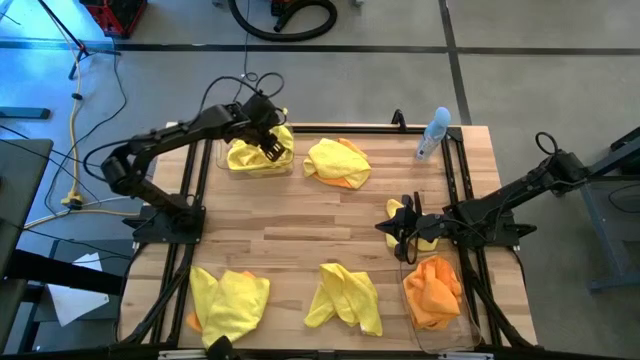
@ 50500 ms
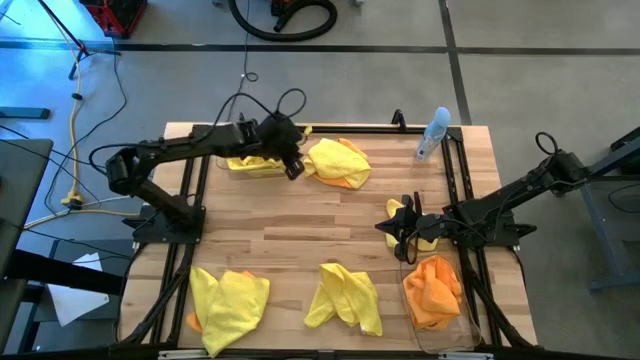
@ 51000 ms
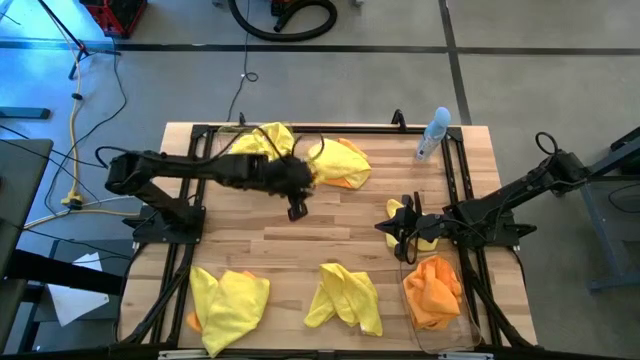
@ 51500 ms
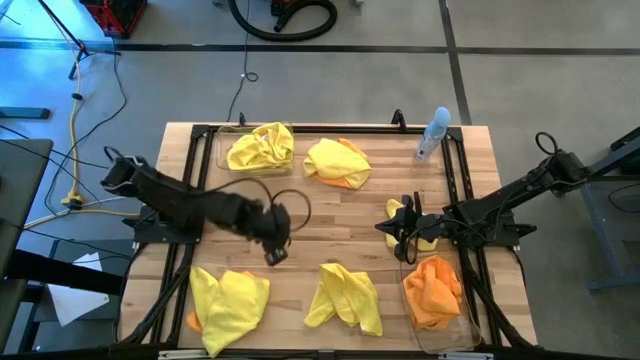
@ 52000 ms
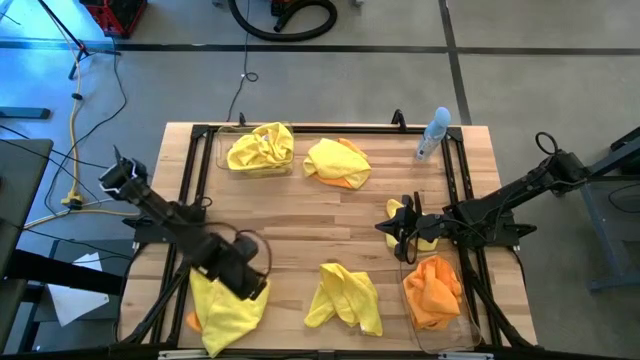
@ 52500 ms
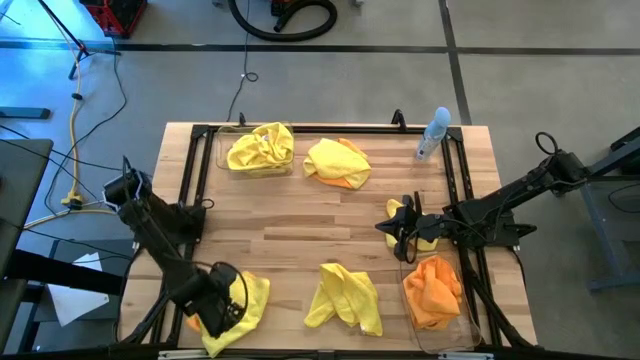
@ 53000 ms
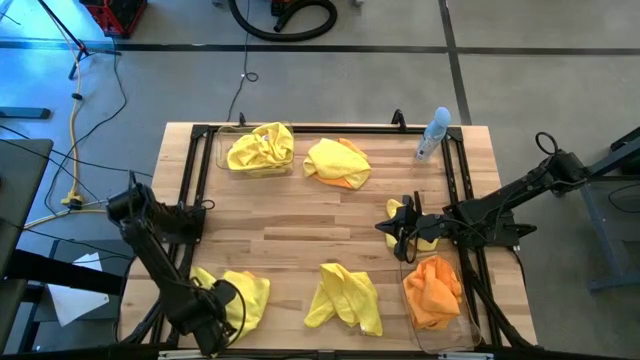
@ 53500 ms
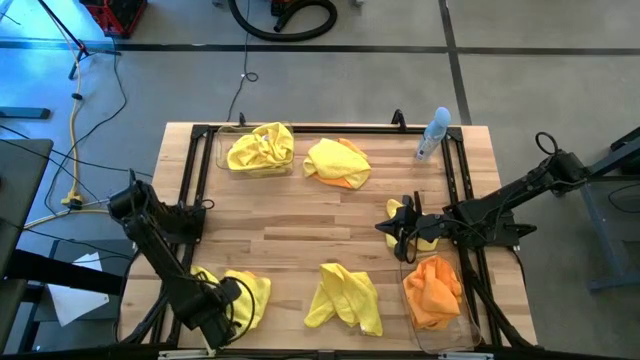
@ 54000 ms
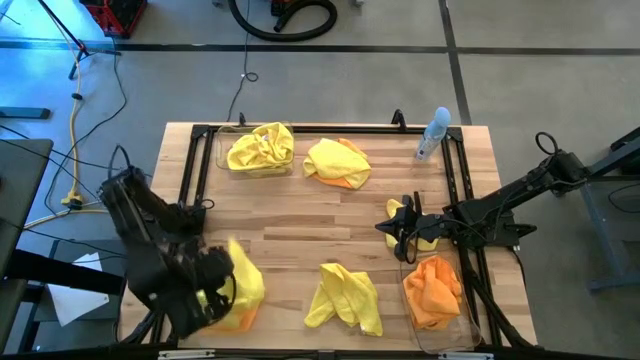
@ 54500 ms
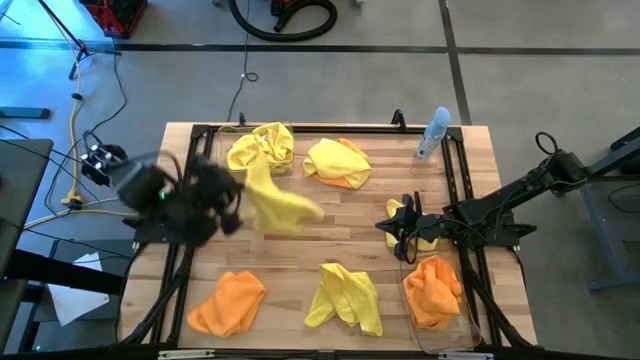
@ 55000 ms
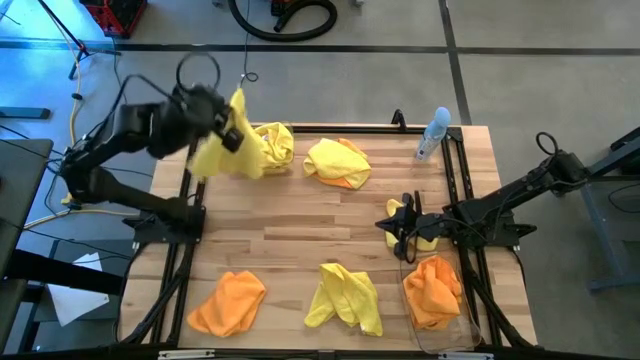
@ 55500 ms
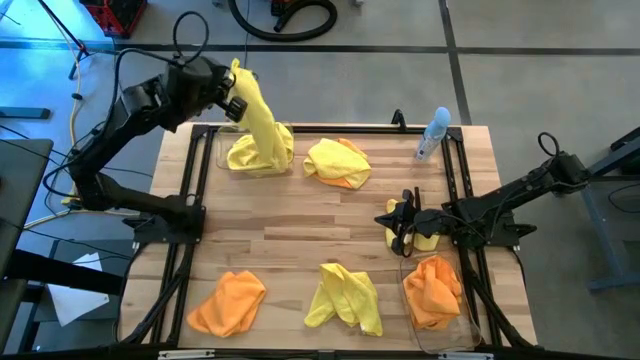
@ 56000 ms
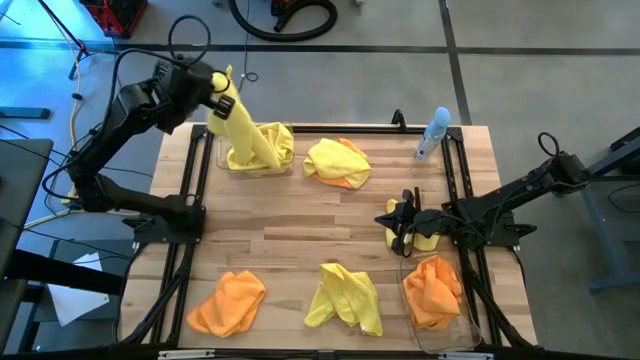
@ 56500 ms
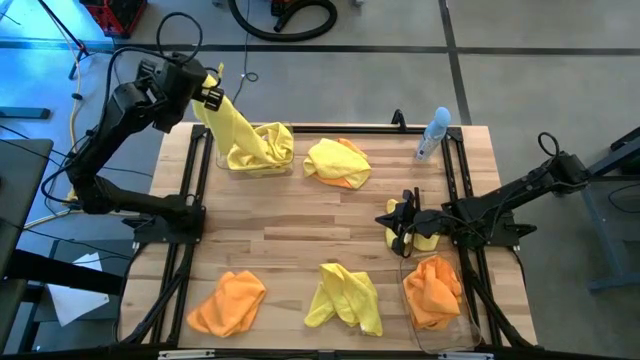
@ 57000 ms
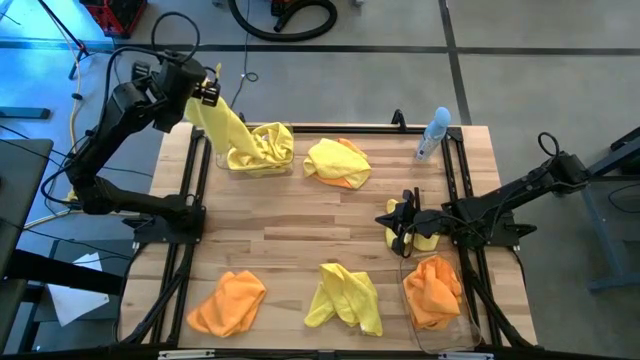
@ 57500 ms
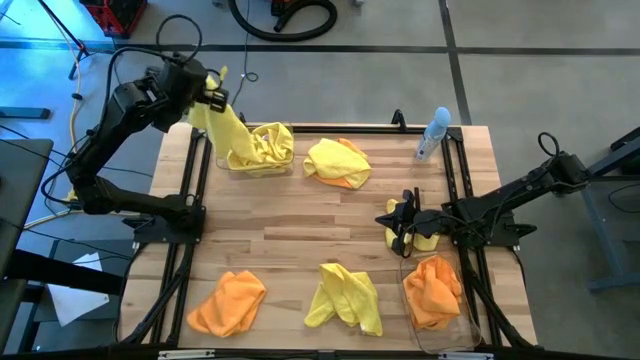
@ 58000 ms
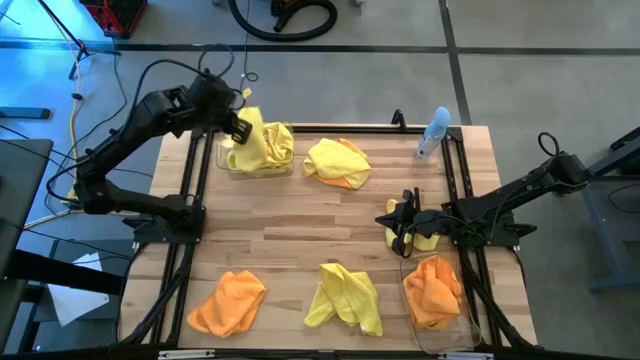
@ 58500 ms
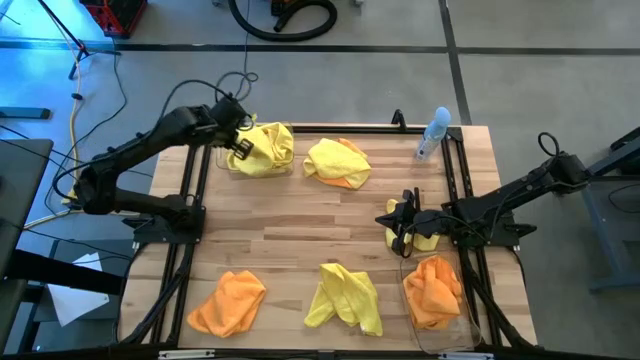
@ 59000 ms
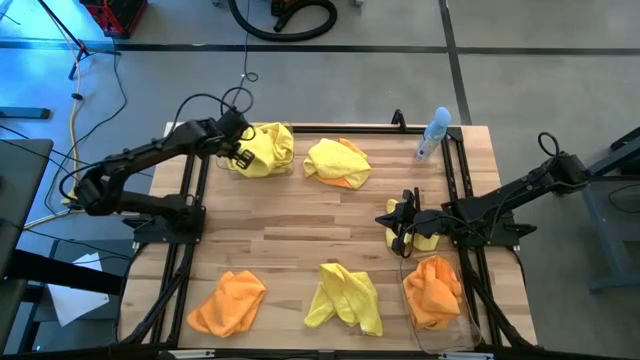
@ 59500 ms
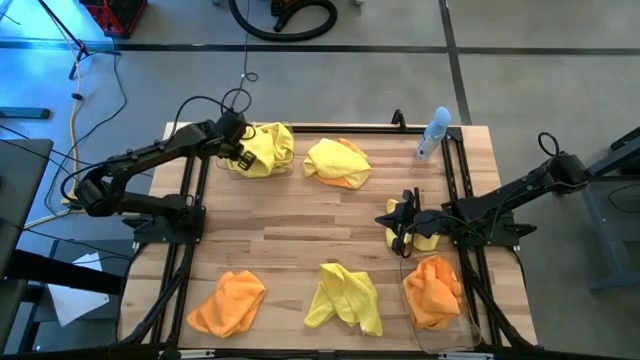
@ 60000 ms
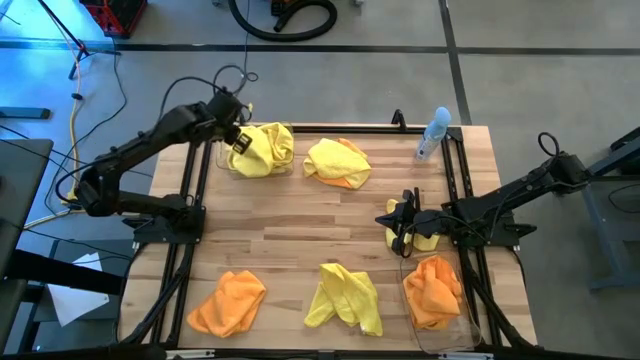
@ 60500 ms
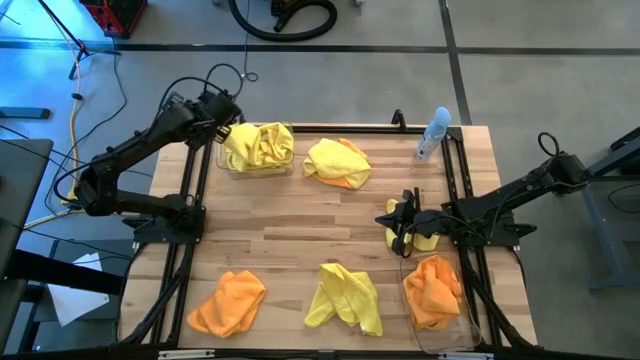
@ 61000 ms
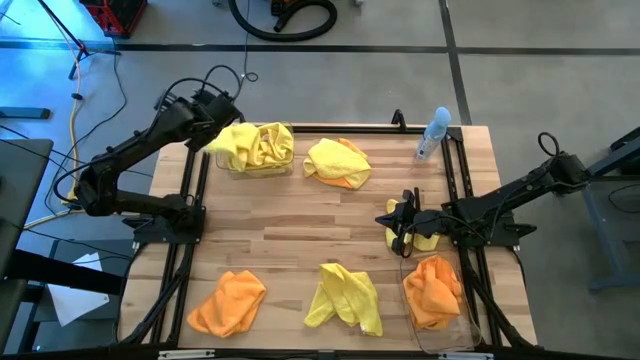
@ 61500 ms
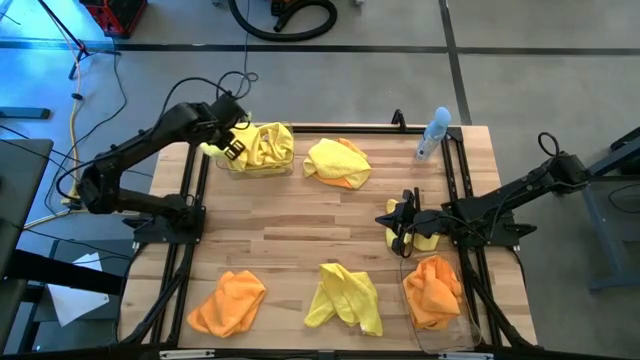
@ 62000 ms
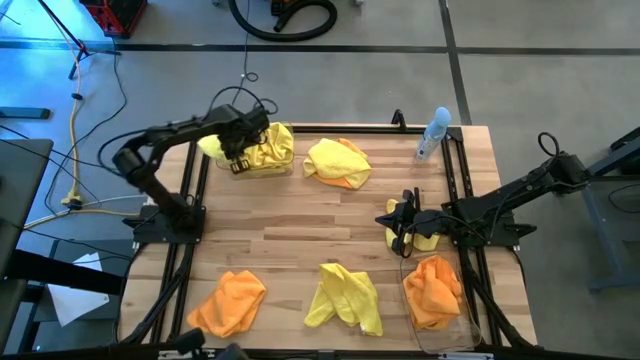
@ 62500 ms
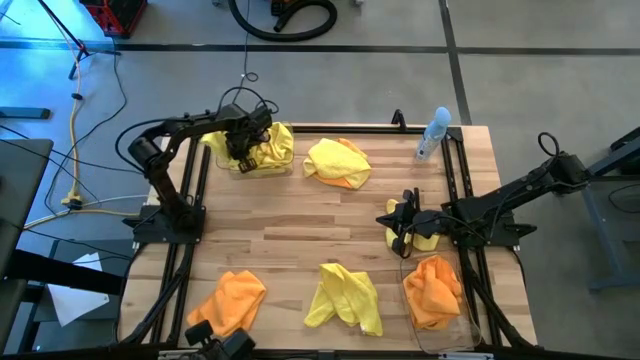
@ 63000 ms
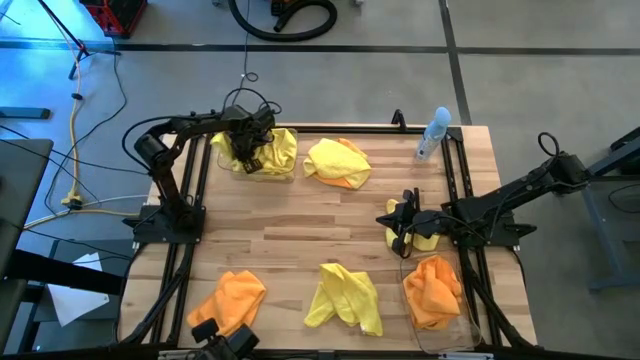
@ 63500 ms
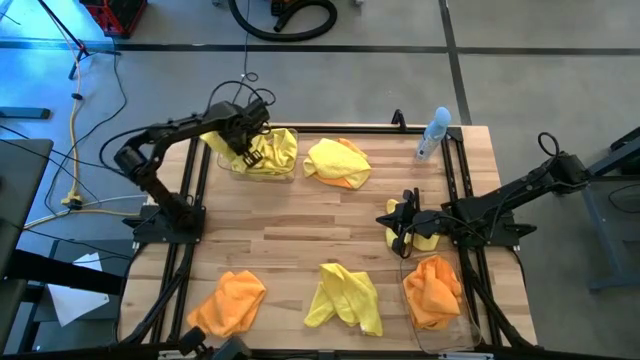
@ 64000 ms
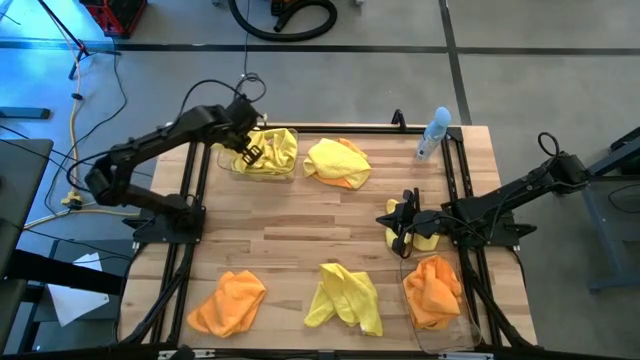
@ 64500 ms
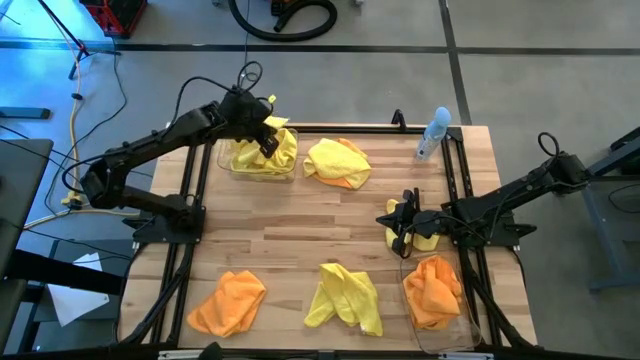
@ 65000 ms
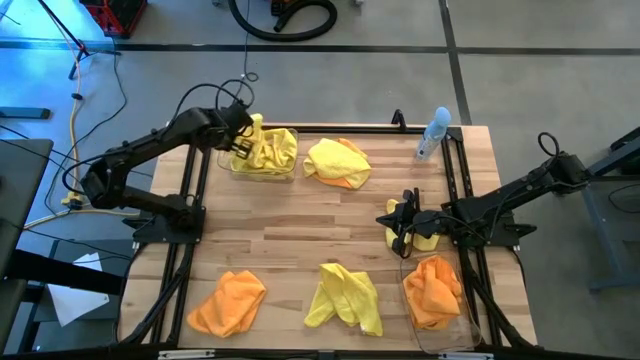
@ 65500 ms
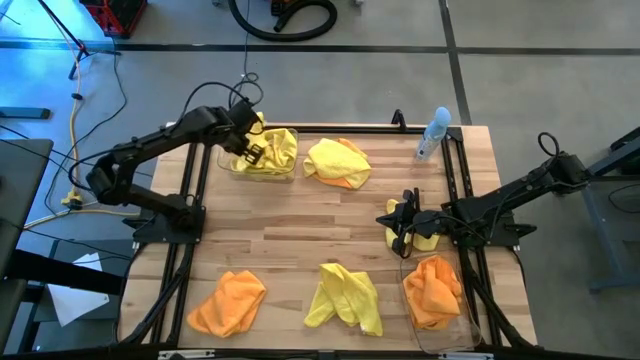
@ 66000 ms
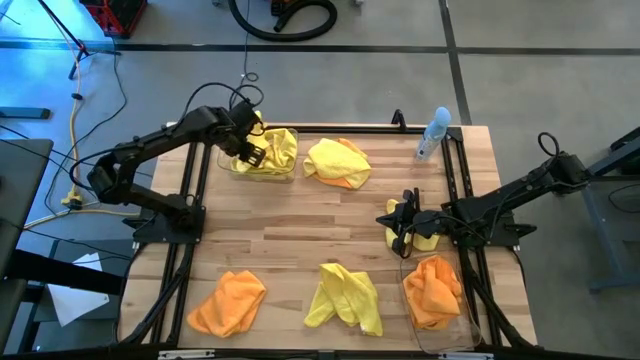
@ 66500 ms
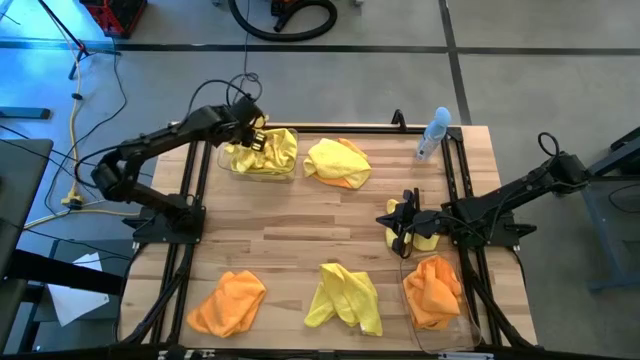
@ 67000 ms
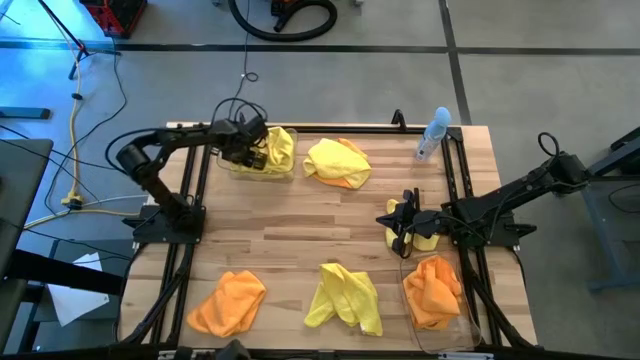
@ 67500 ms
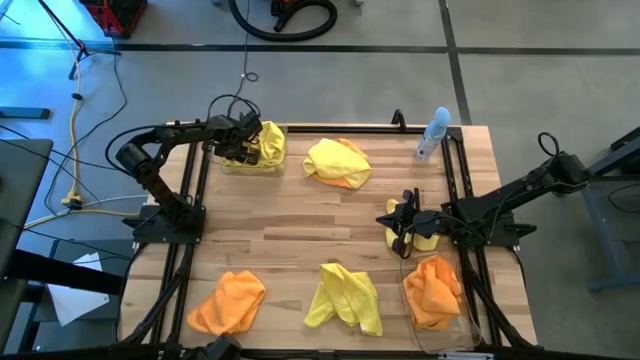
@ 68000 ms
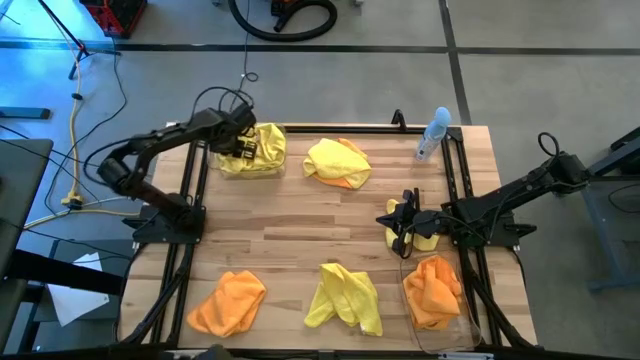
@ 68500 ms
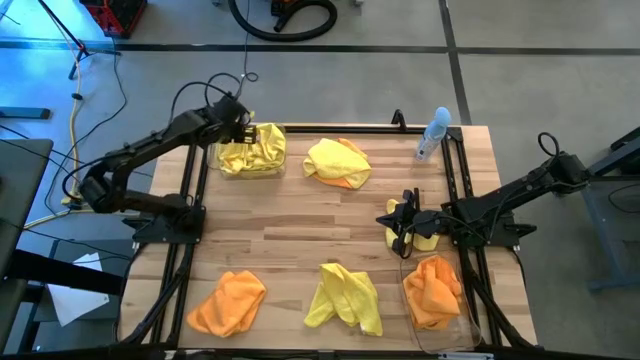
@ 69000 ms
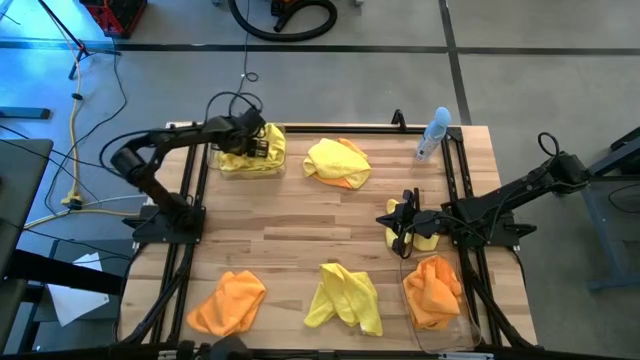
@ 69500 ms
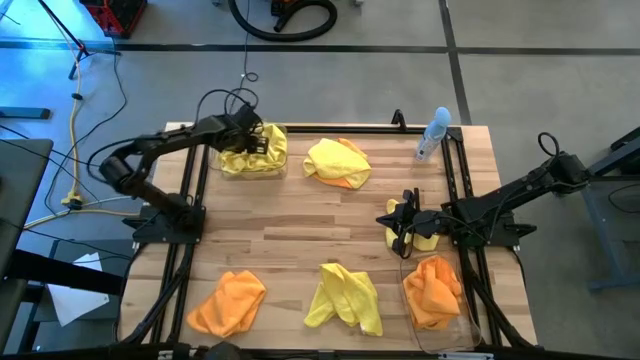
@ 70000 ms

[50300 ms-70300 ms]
Task: Sort microfiber towel by color & place in baskets
Put the yellow towel into the top transparent bin
